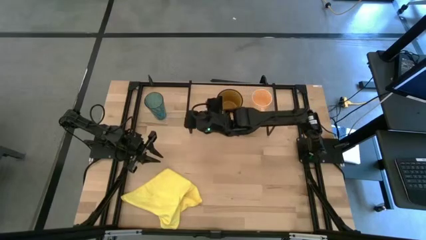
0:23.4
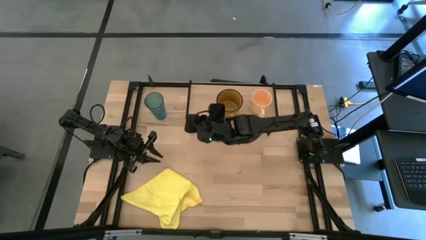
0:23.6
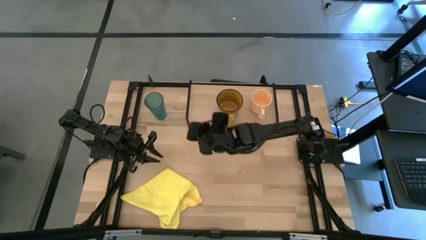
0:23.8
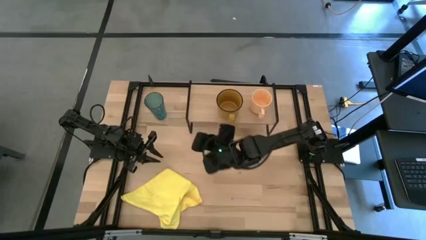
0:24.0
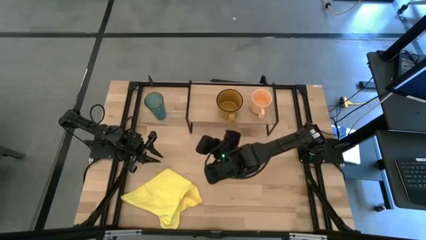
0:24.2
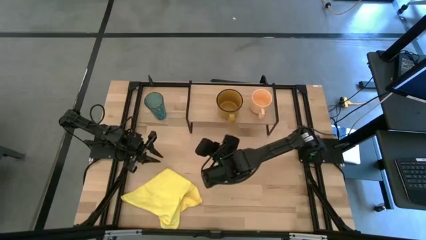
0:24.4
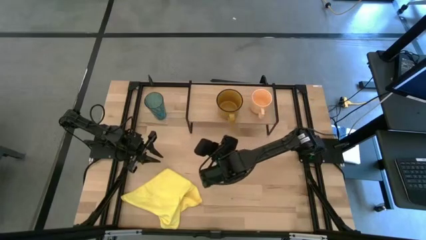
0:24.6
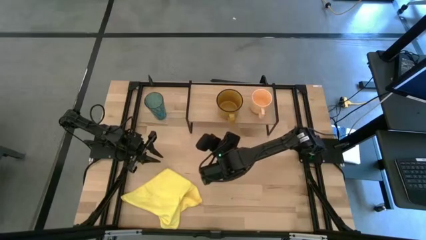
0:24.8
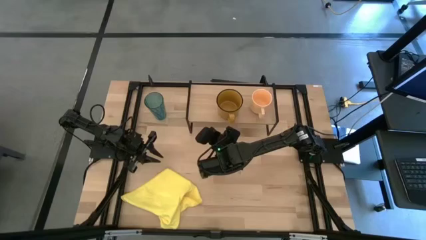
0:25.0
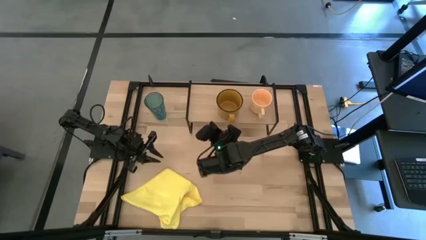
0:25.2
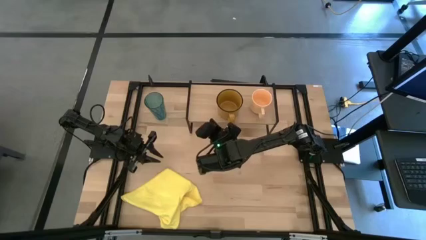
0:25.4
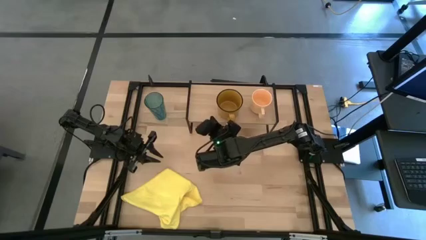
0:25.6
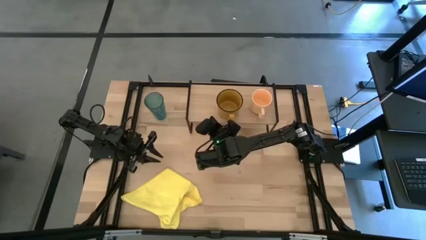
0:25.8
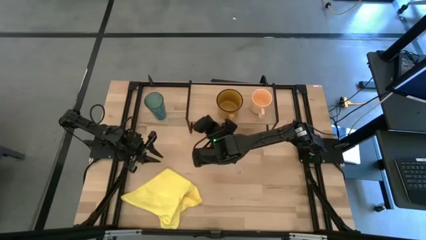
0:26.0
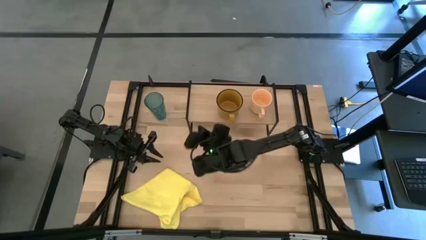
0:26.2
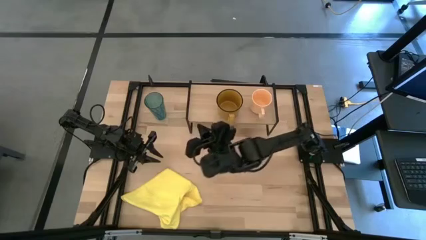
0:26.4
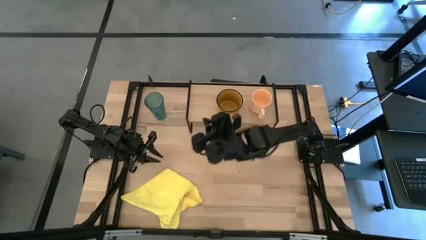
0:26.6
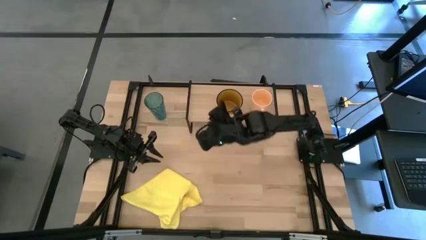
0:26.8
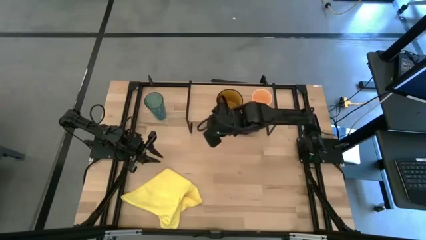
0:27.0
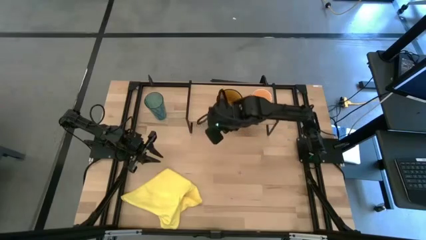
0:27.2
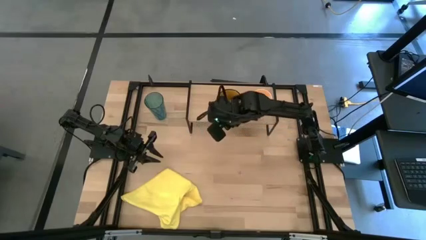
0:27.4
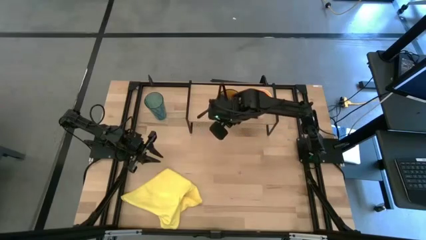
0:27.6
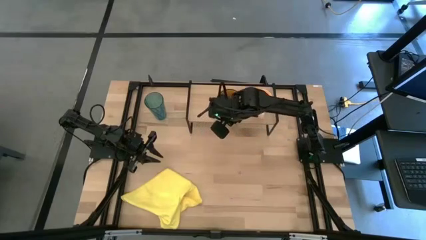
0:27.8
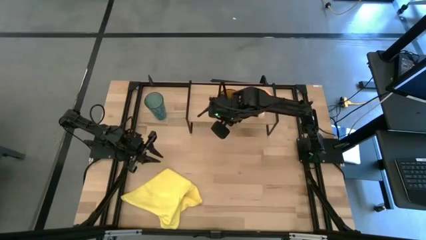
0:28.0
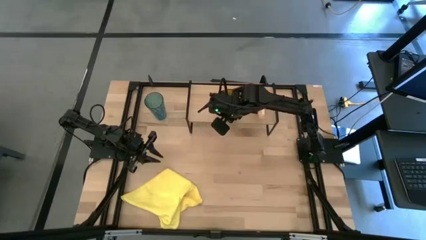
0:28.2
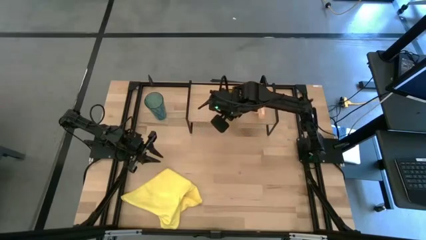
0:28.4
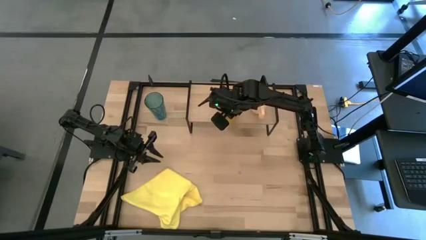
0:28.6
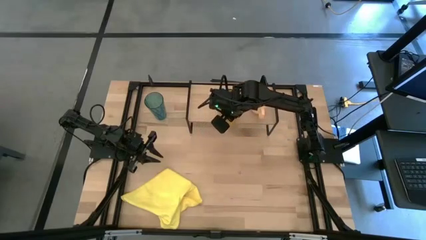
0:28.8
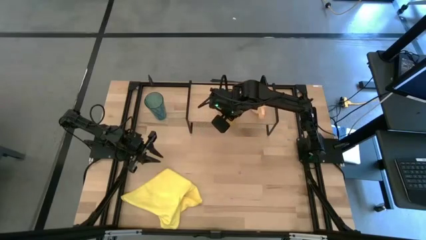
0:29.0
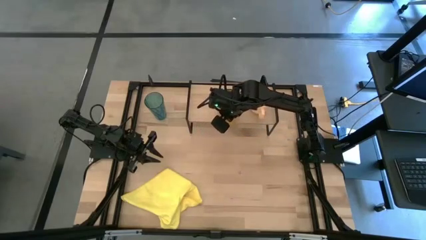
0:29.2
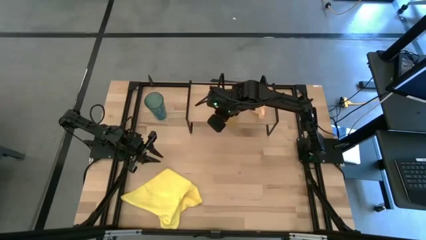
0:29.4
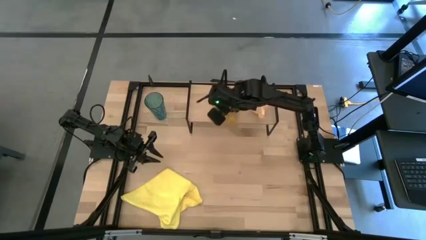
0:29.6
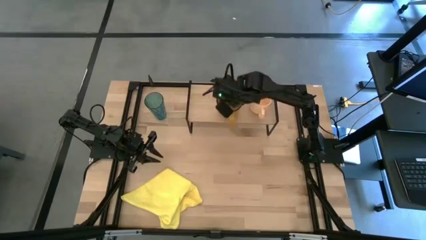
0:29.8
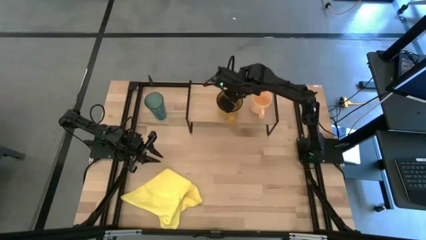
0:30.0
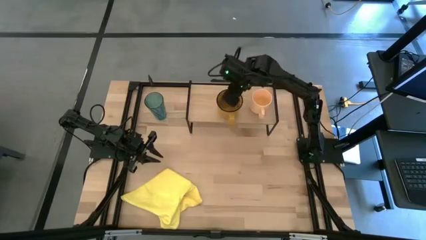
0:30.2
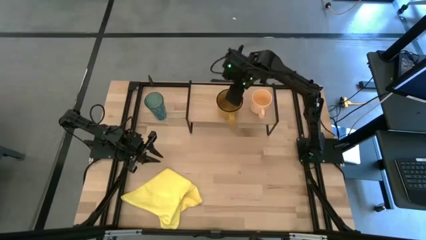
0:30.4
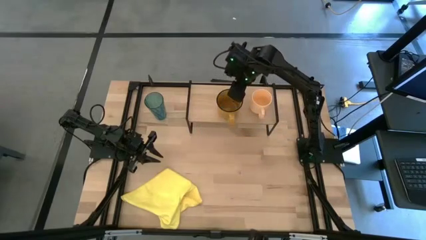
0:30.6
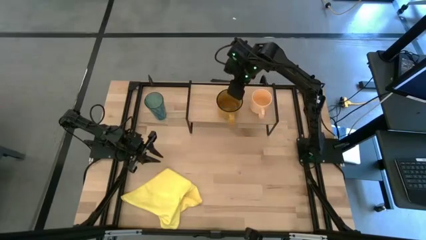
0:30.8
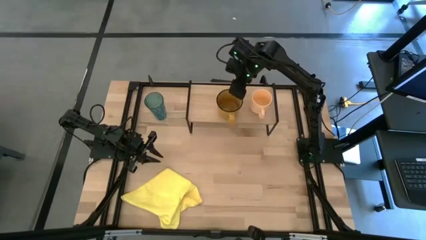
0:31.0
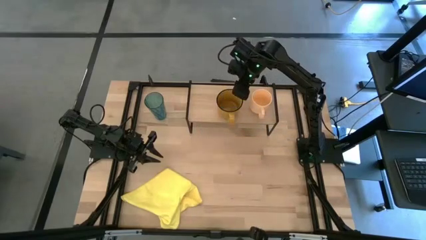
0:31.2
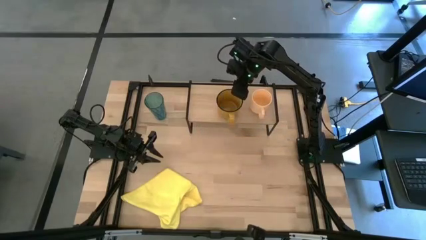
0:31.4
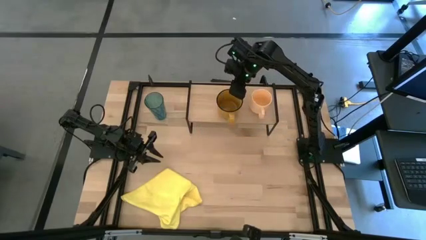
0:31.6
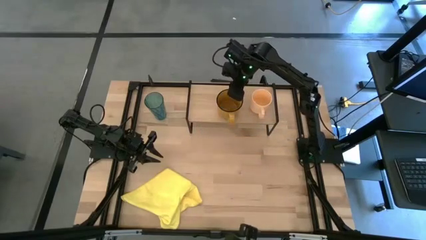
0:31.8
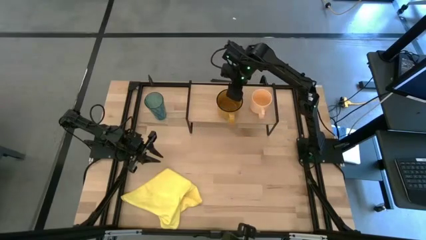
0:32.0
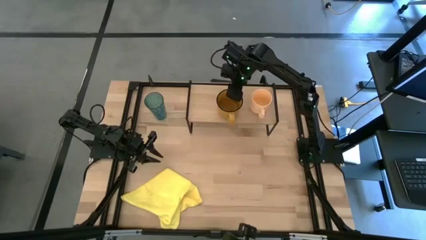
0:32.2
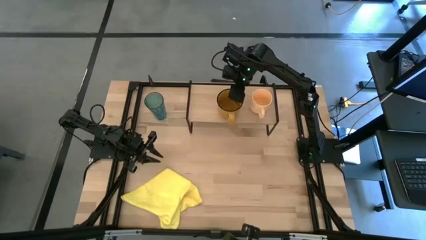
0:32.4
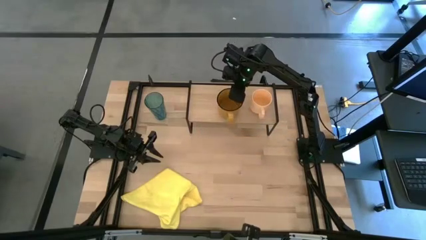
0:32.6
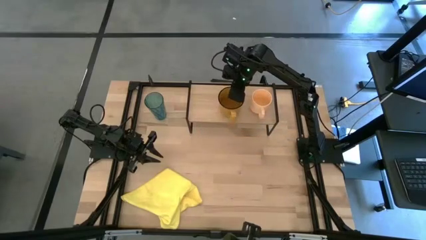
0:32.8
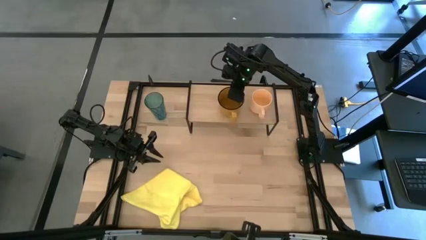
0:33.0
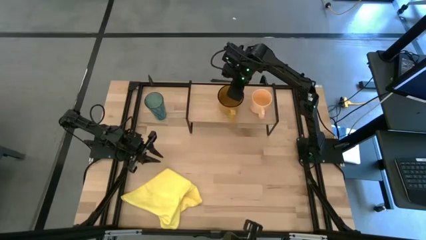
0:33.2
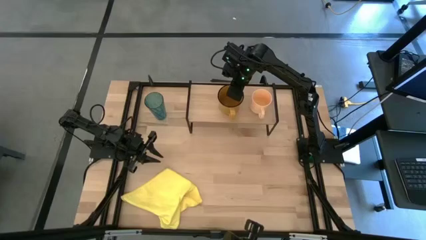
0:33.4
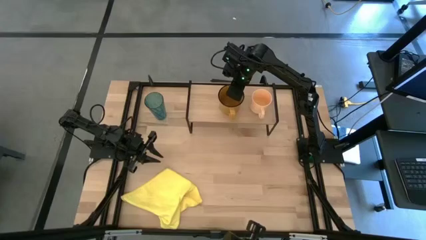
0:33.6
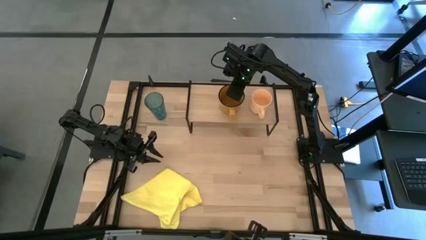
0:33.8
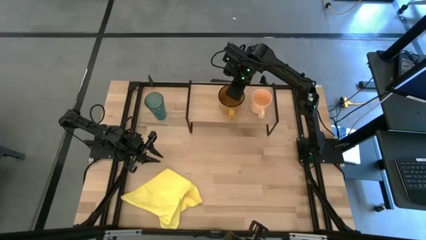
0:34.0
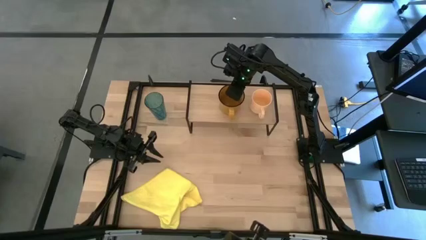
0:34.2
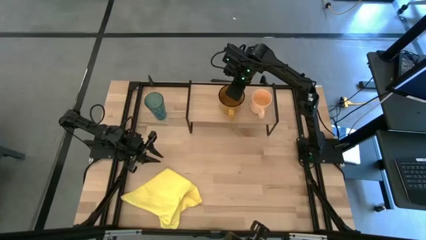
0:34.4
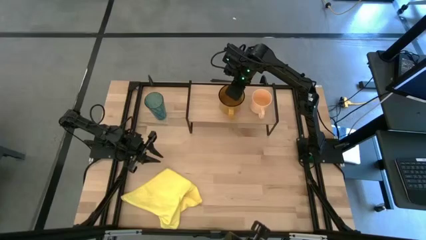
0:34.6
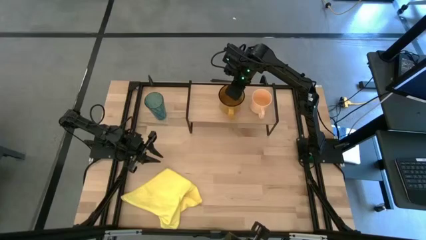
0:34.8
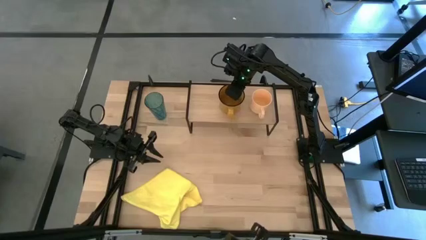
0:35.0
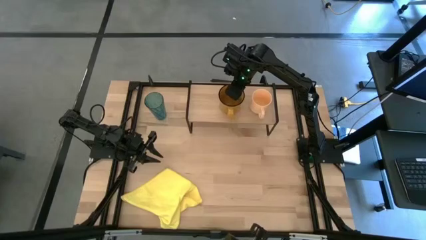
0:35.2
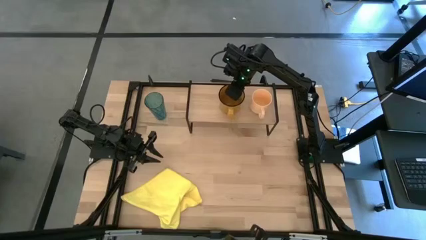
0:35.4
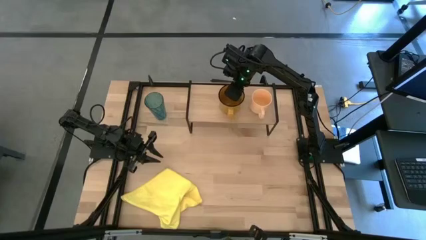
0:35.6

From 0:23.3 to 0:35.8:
Task: Stack small to large cups/mugs on shelf
Put the orange mug on the shelf

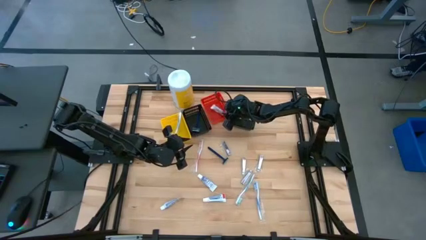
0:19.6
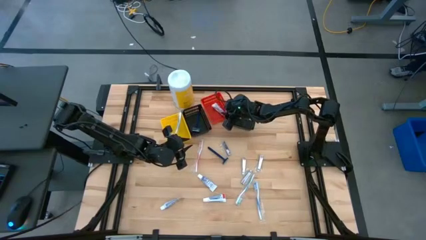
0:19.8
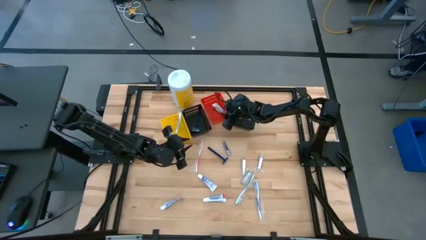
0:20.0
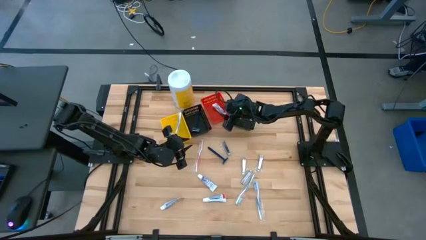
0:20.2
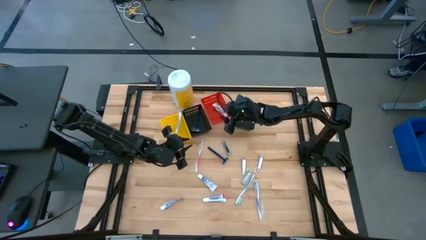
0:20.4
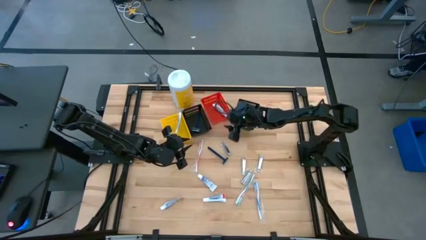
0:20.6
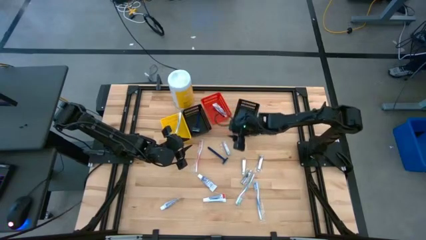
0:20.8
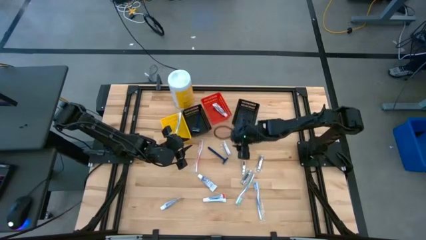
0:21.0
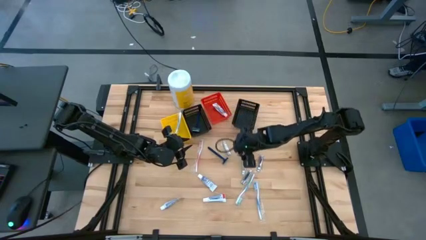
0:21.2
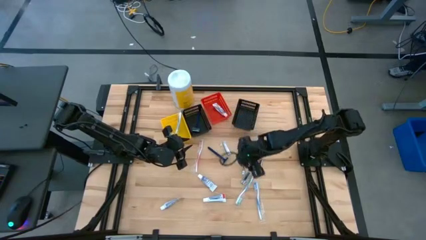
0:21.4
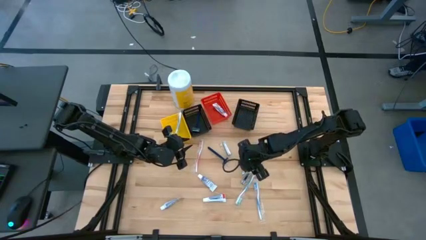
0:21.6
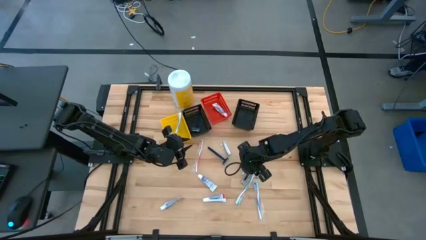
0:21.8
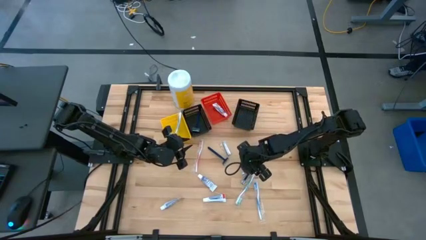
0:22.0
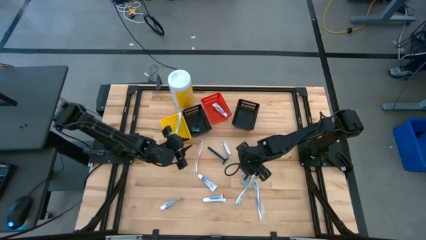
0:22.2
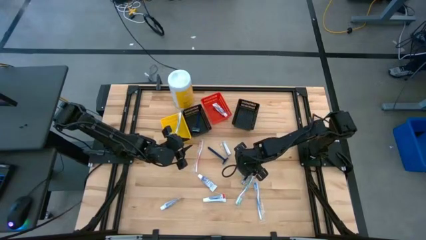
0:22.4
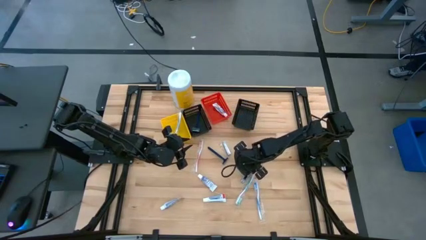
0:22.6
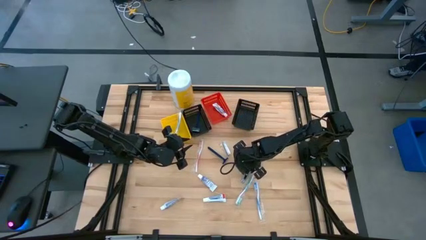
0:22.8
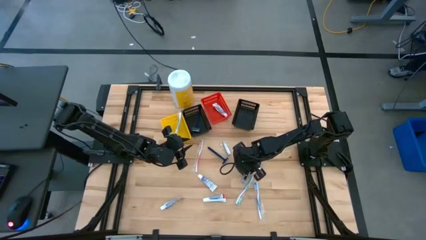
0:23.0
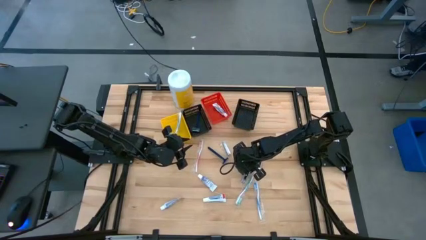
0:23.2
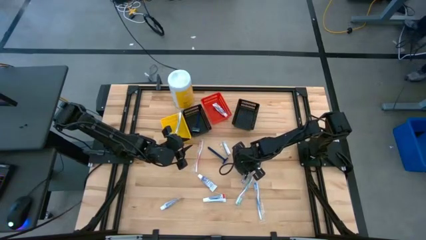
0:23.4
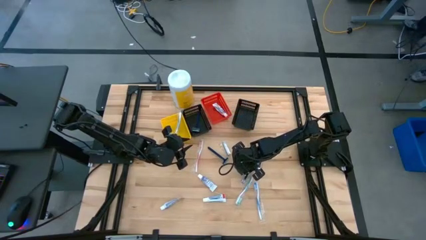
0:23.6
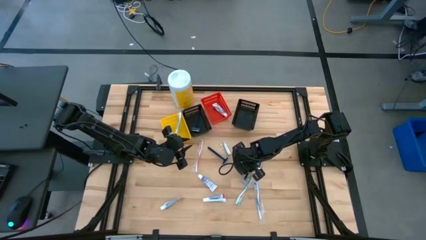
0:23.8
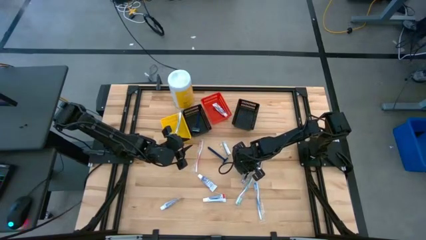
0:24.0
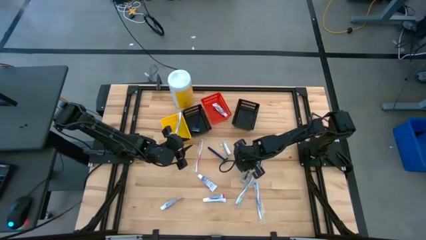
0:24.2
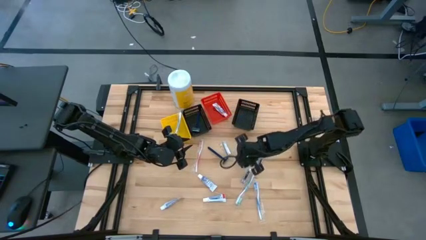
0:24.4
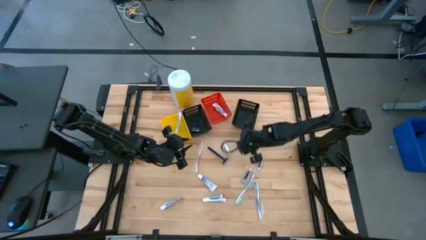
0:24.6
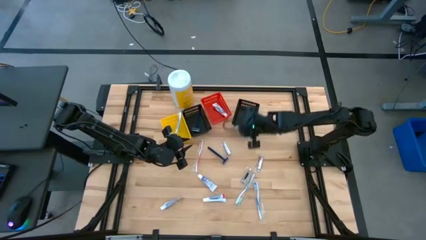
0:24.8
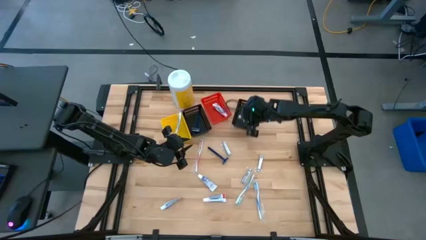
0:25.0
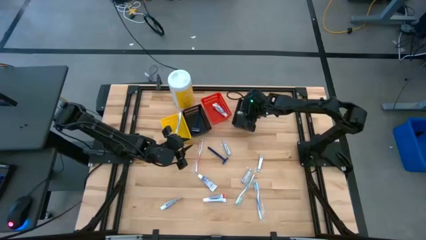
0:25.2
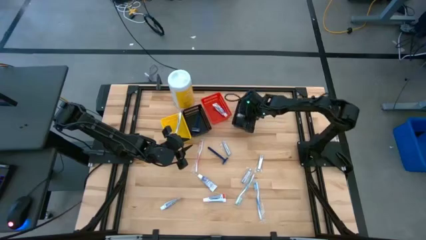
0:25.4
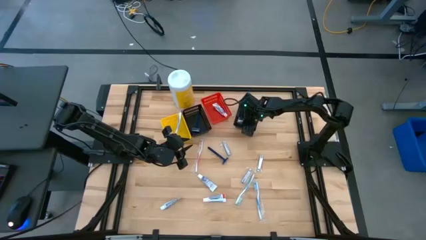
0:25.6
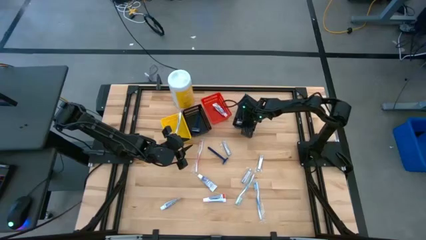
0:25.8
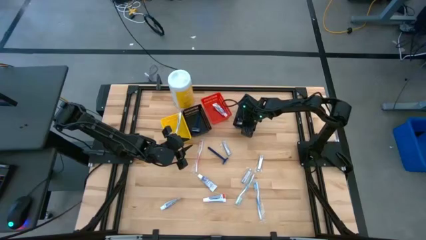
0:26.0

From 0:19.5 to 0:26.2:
Task: Pick & Place Travel size toiletries
Put the silver nail cutter into the right black bin
